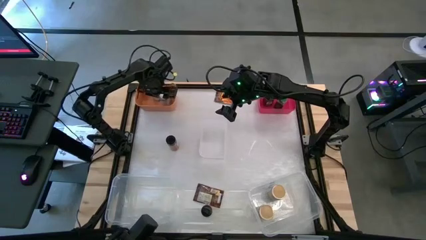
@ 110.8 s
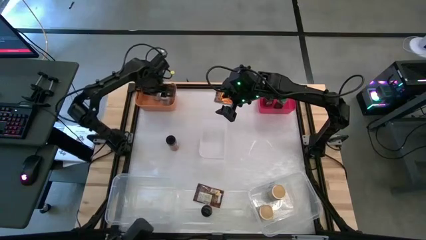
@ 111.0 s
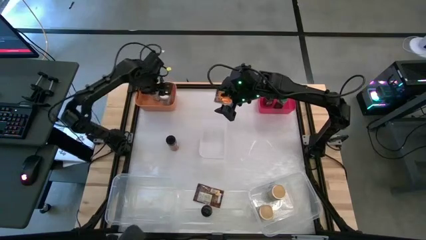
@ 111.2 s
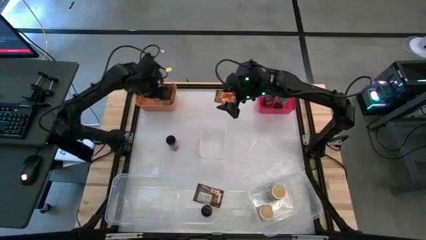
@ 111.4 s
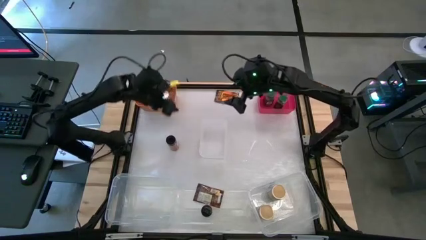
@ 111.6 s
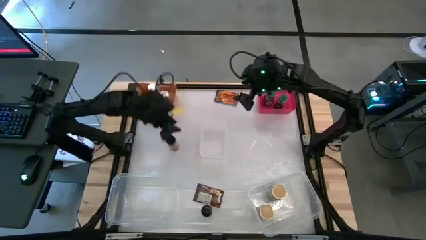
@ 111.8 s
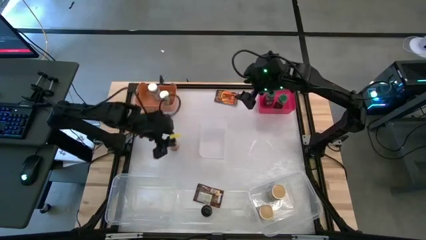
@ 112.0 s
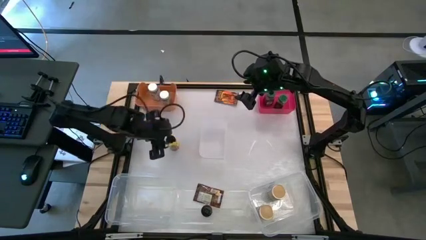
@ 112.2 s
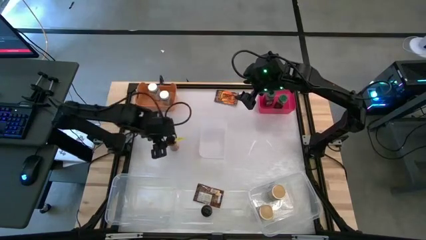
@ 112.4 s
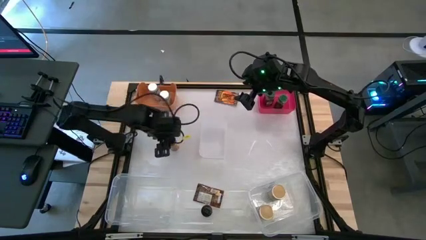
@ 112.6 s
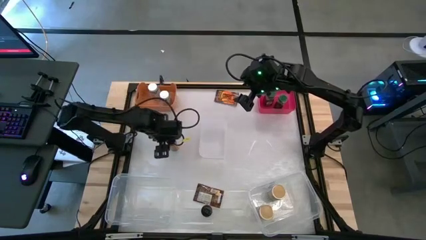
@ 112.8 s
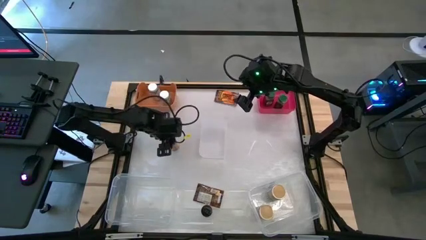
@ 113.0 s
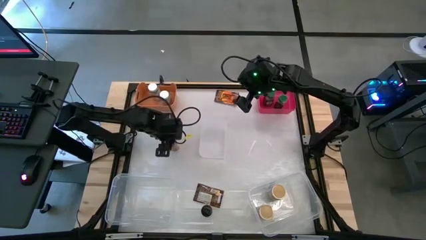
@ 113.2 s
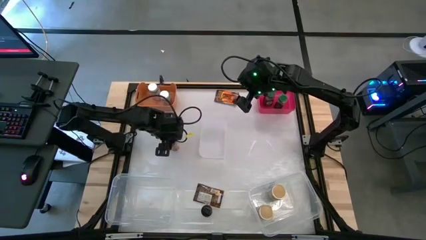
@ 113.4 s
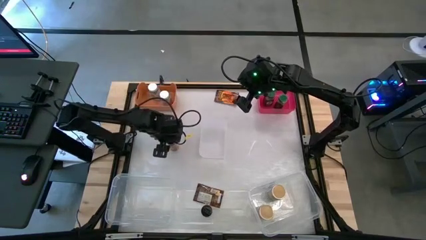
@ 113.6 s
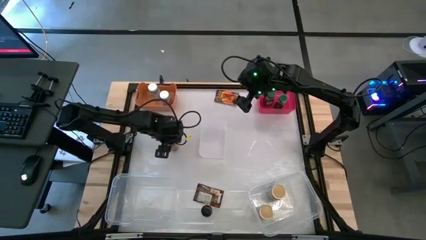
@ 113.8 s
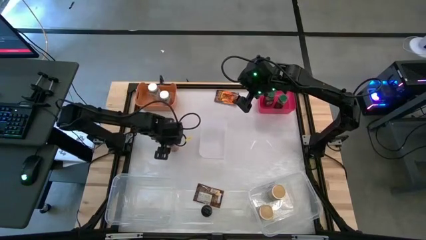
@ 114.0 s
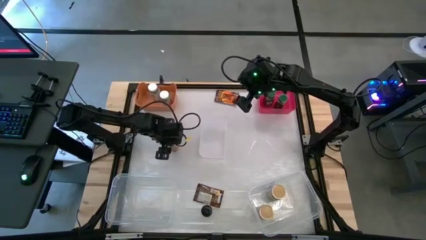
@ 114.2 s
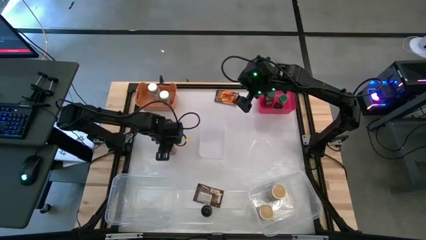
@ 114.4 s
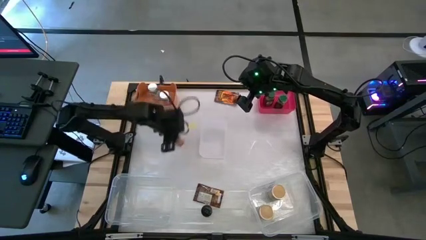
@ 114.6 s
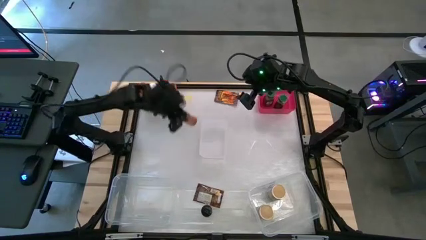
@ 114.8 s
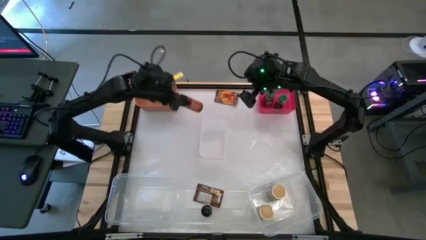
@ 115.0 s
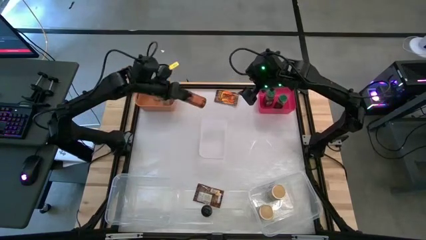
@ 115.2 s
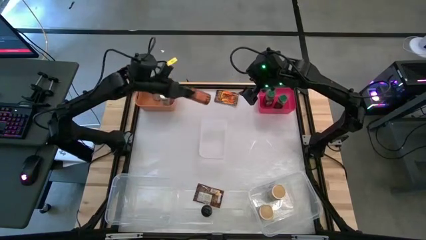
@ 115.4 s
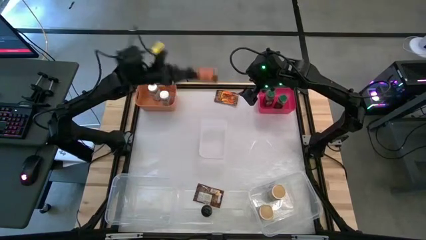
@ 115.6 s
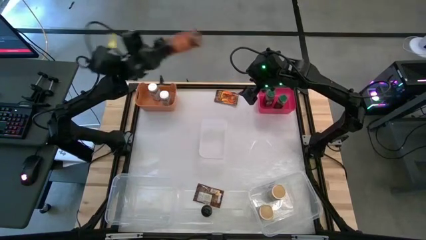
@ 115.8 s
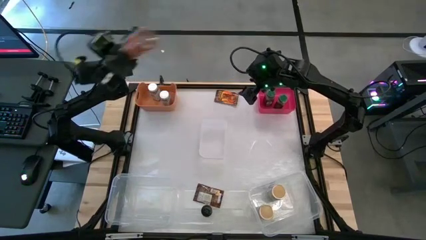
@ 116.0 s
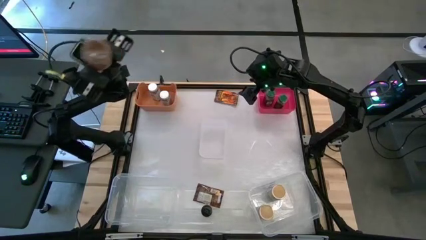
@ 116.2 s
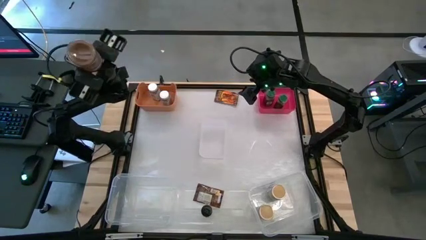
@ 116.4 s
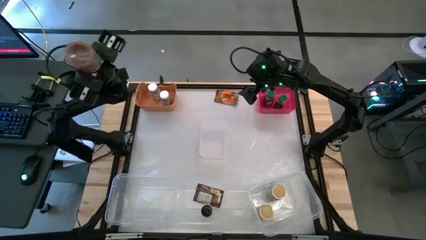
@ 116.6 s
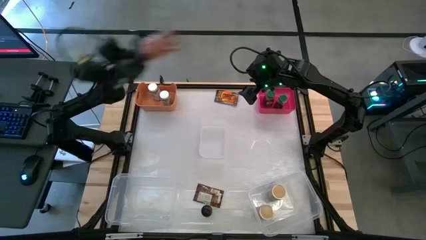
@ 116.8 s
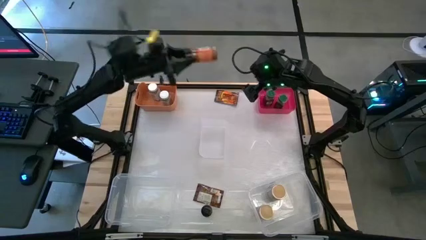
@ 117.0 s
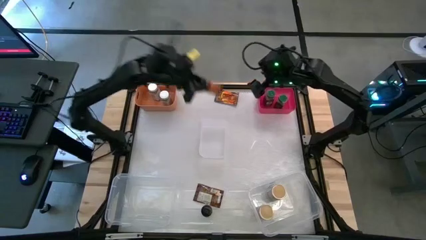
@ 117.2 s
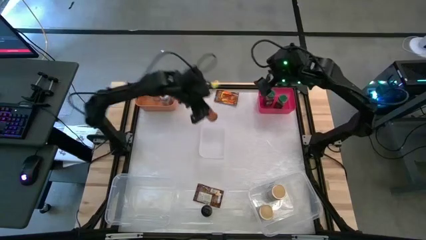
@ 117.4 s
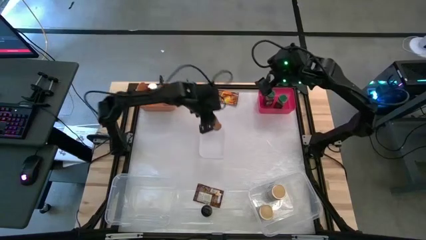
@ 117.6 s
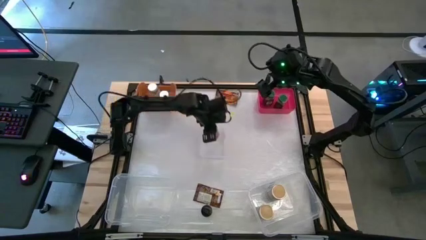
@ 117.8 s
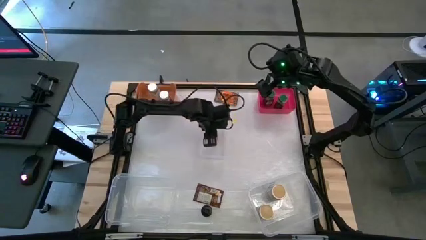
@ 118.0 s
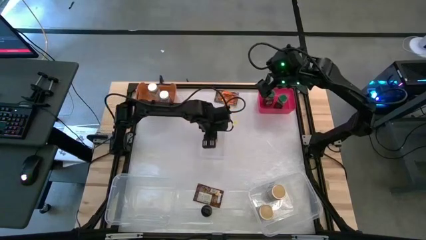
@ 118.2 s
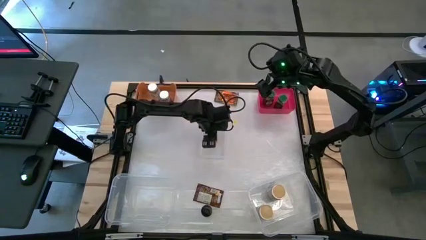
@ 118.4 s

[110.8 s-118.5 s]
Task: Sort spices by type
Put the top black seasoning bottle into the top transparent bin

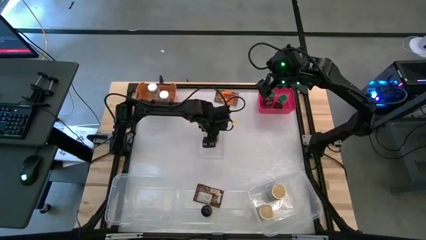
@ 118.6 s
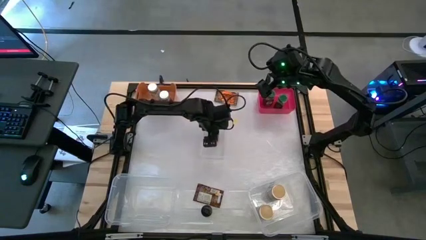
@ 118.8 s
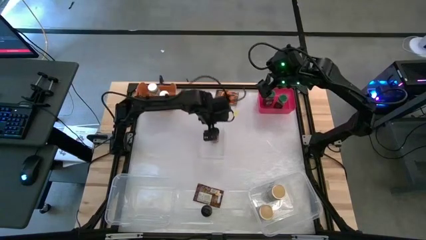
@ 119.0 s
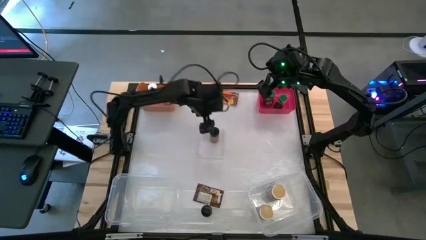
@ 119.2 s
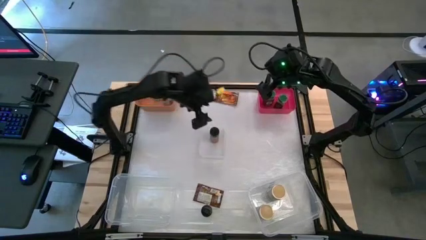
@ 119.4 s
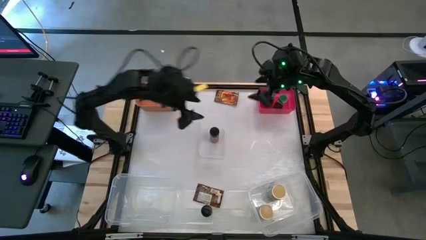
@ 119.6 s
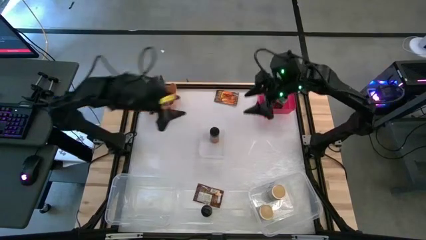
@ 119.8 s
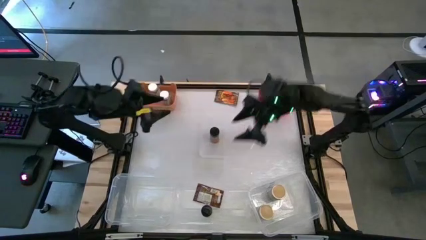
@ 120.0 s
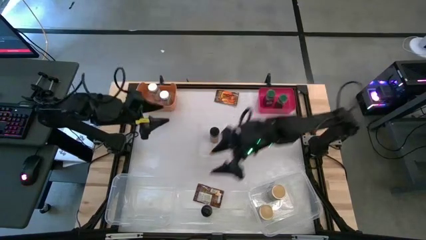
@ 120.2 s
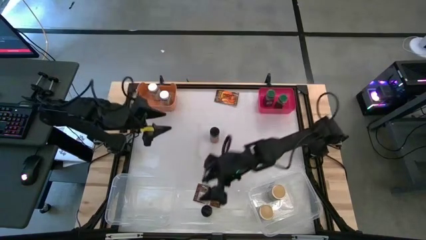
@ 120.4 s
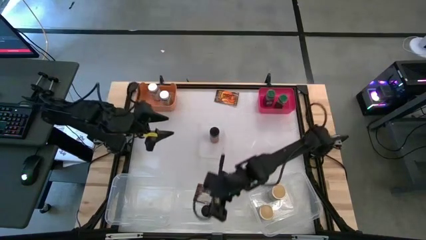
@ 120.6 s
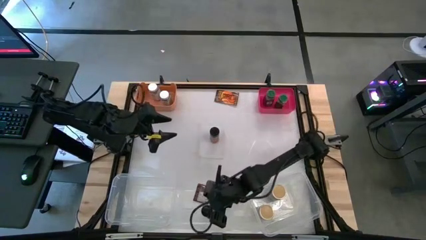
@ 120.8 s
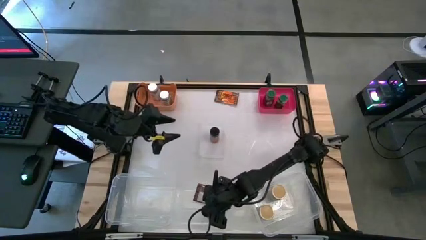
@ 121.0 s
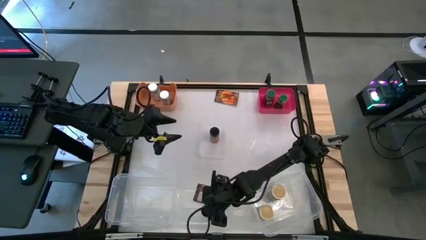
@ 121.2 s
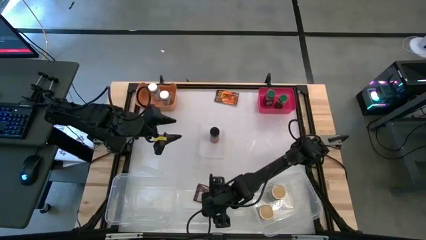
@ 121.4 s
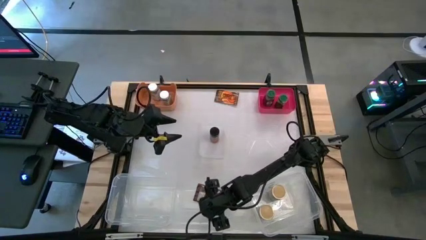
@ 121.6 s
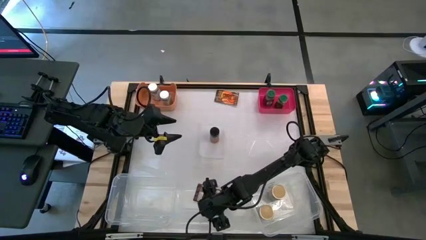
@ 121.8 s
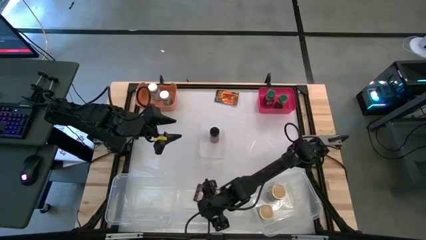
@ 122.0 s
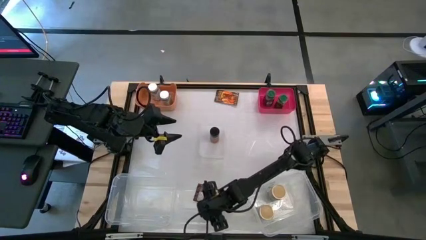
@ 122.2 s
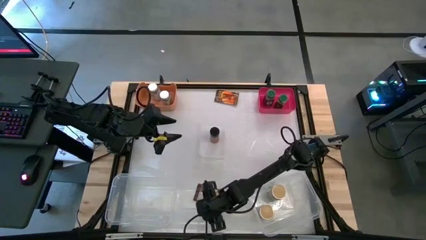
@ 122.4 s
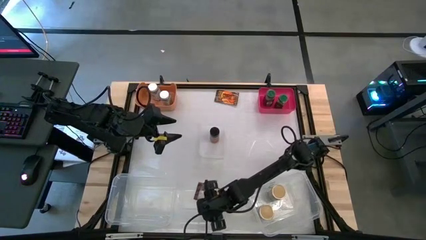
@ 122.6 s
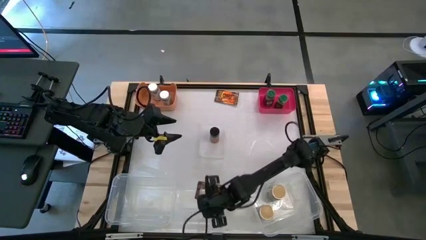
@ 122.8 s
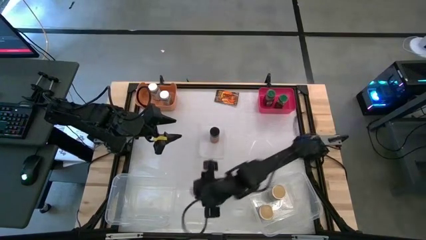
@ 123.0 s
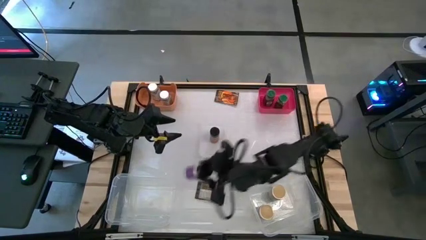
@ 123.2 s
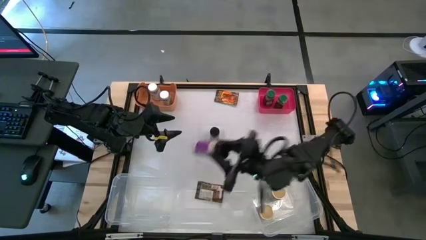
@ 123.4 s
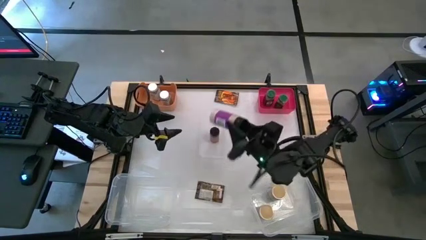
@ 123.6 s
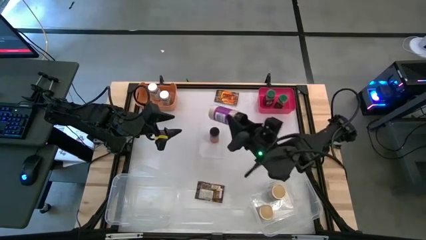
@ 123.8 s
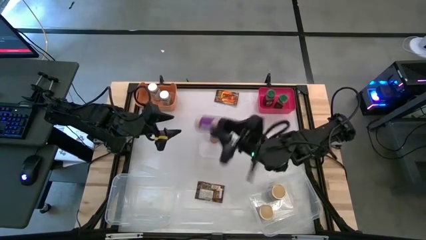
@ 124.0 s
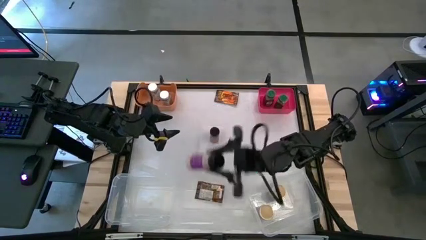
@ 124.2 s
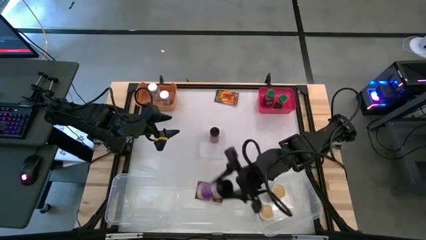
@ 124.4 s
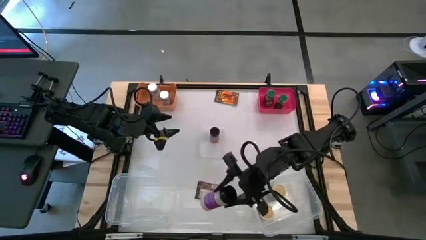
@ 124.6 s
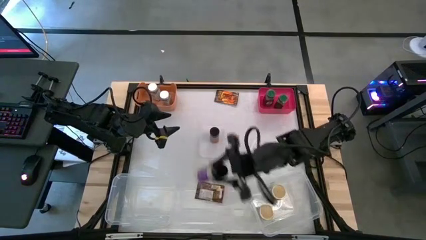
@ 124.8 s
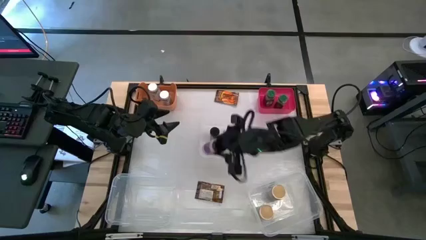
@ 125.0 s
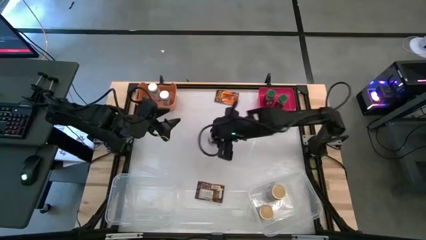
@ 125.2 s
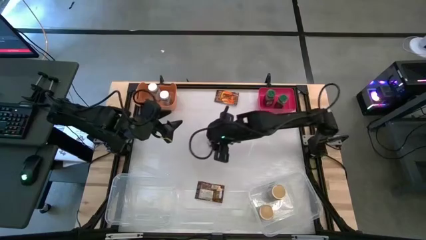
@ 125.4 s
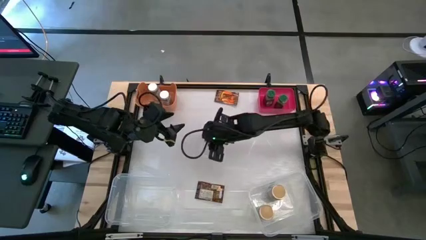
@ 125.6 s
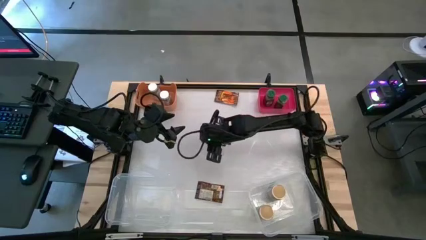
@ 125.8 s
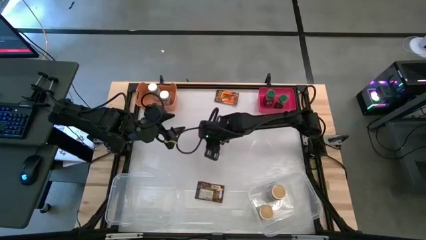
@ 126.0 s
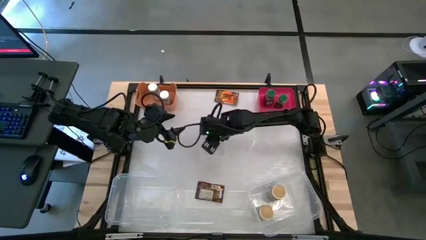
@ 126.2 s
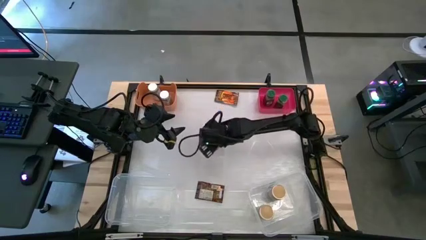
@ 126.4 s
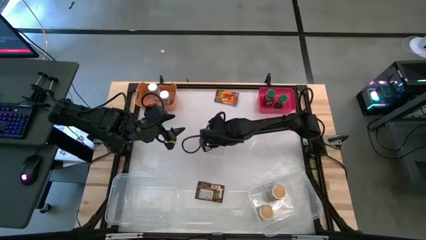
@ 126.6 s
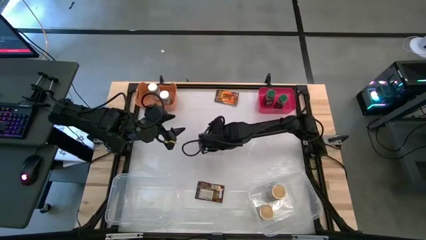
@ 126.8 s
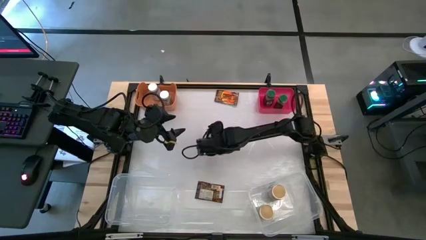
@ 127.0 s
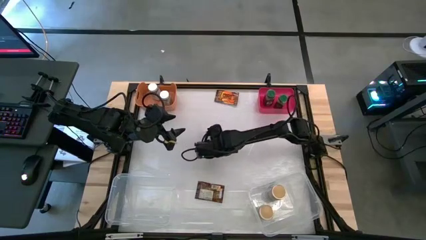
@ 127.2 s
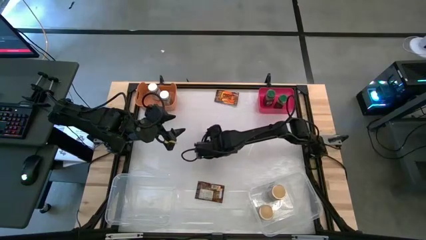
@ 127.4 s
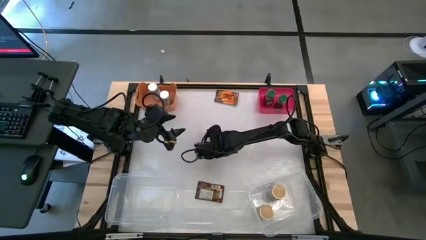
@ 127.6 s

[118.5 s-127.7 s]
Put the black seasoning bottle into the top transparent bin
